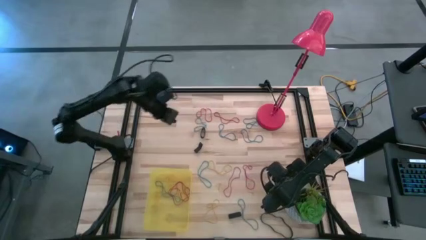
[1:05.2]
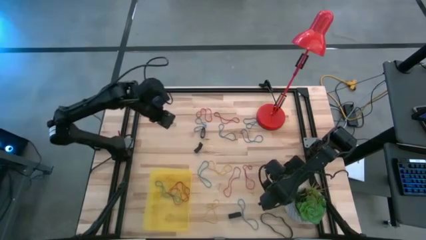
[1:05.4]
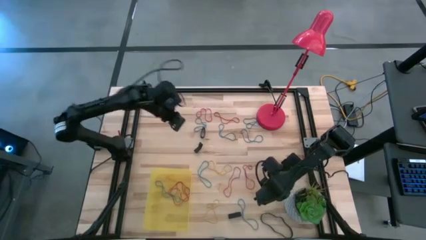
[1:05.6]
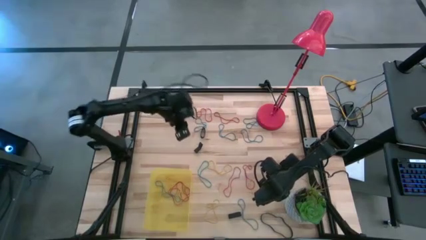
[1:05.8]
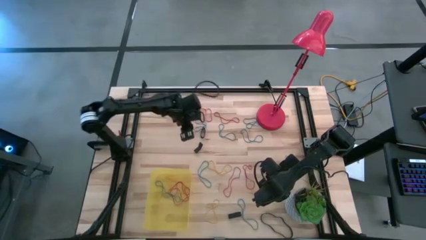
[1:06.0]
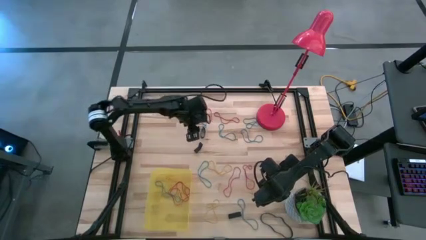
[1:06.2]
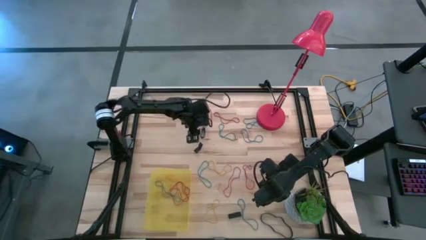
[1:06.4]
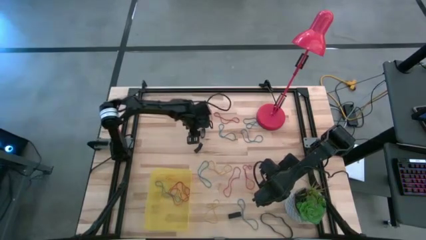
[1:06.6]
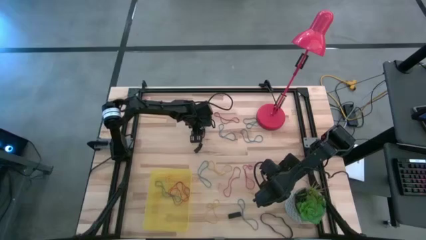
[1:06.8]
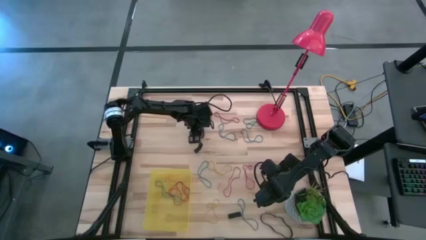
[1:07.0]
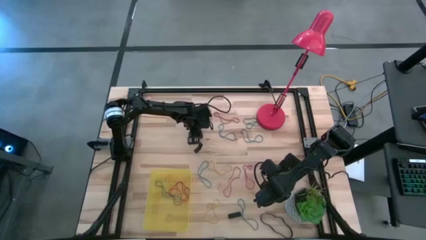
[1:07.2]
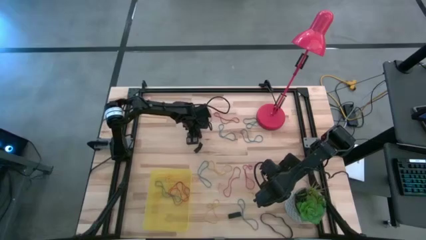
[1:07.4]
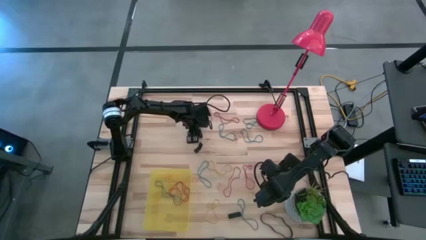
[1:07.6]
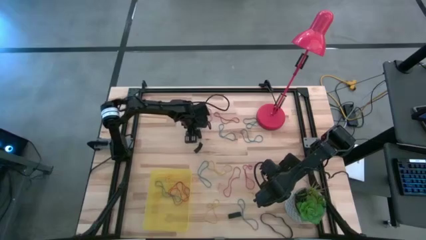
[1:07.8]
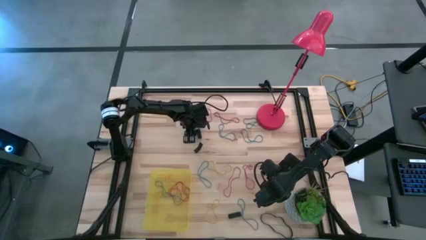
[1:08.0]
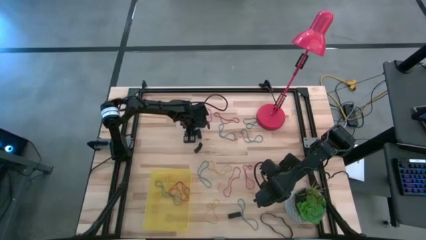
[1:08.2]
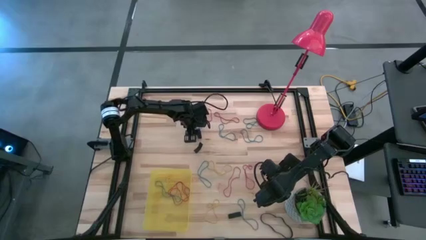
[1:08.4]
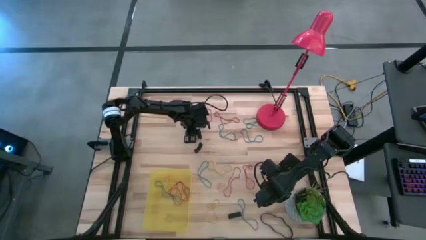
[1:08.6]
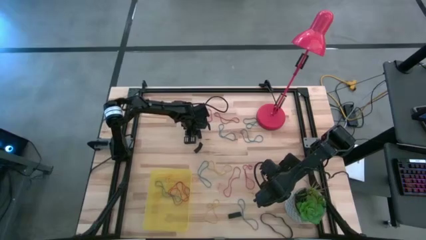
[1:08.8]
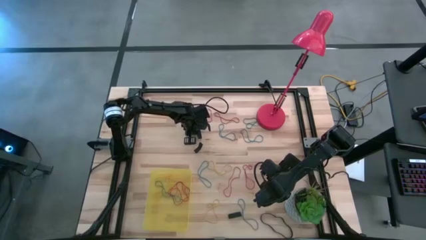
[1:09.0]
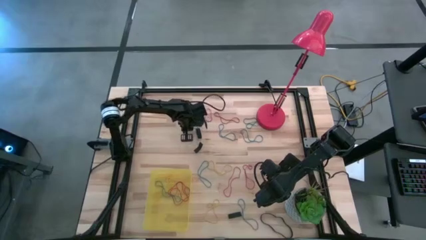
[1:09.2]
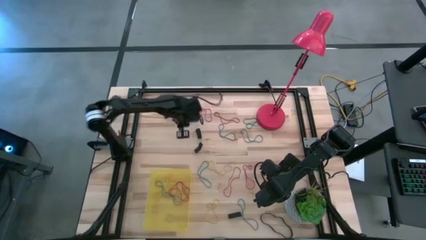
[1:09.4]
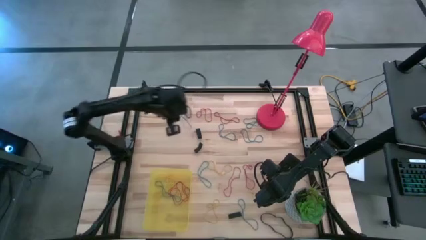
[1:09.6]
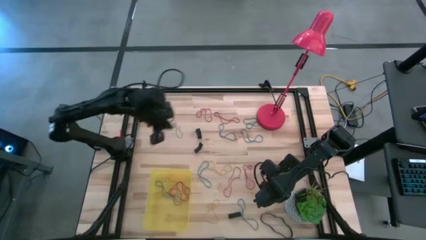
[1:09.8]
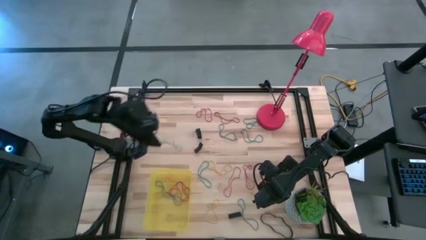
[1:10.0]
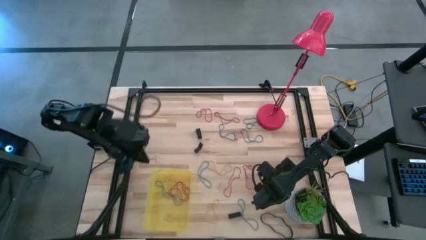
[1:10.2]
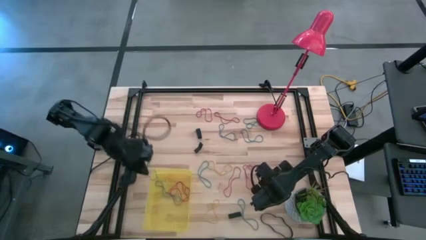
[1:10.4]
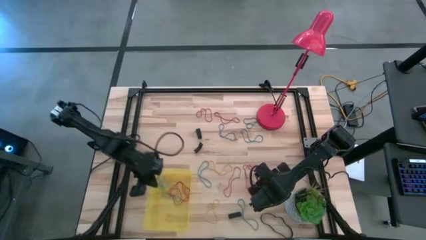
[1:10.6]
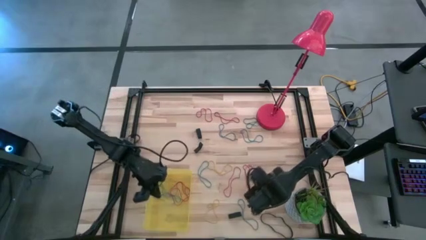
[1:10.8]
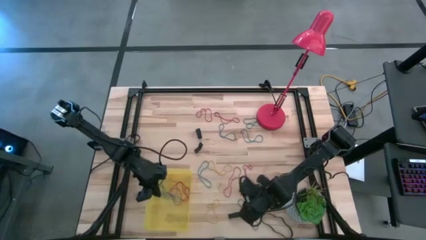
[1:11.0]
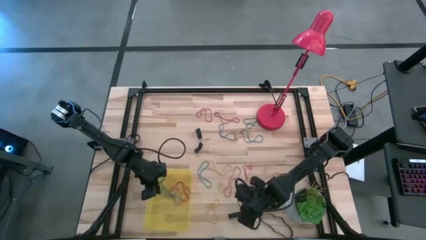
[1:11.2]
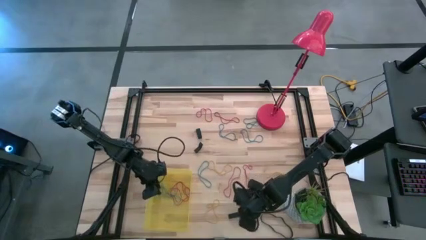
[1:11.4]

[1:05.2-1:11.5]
Task: Pick and place rubber bands into bin
Put the blue rubber band into the bin

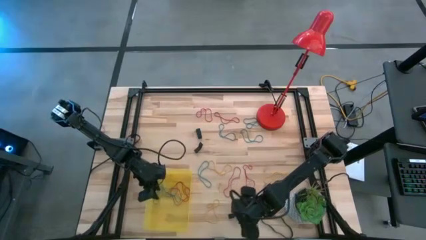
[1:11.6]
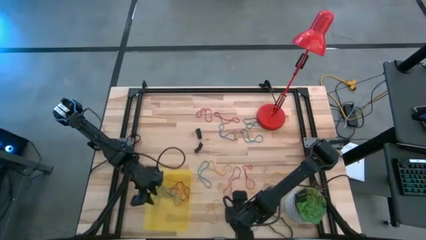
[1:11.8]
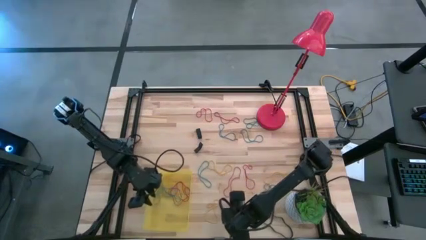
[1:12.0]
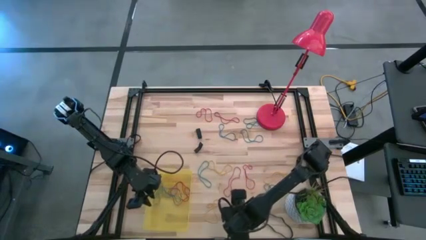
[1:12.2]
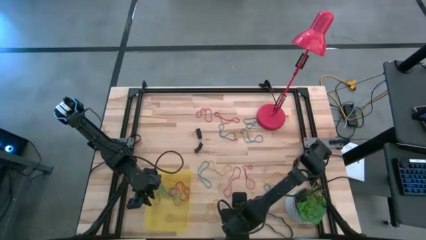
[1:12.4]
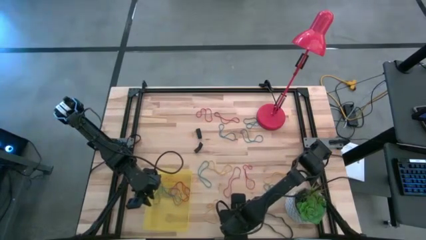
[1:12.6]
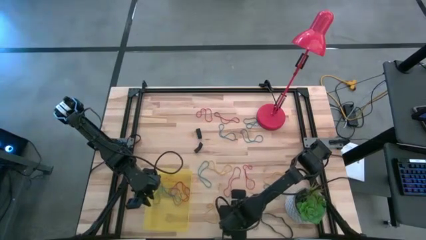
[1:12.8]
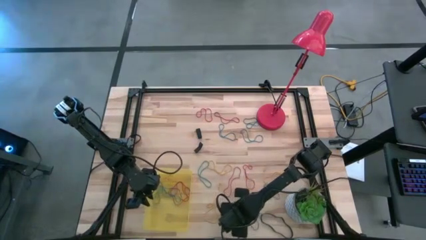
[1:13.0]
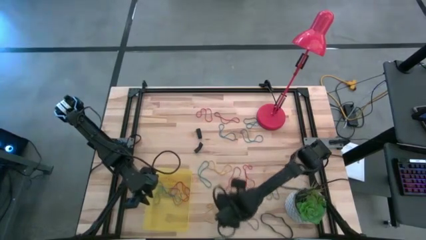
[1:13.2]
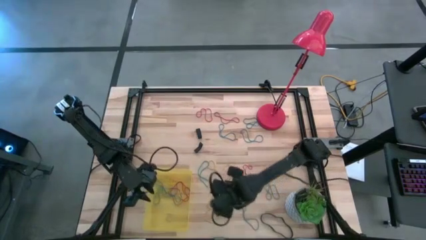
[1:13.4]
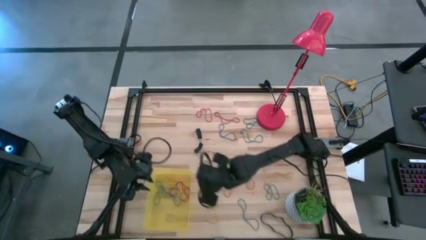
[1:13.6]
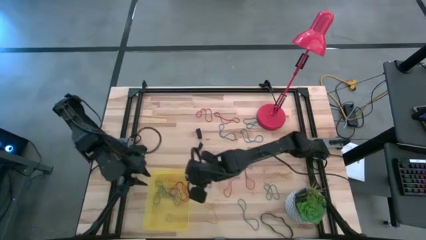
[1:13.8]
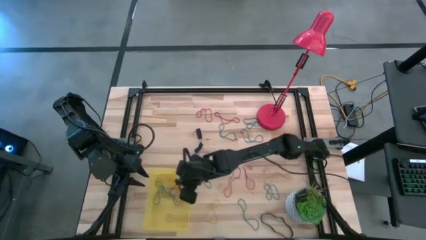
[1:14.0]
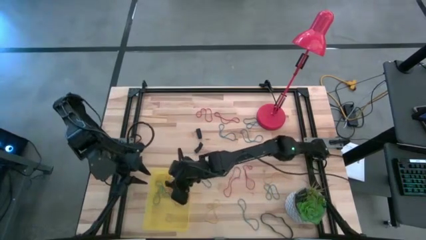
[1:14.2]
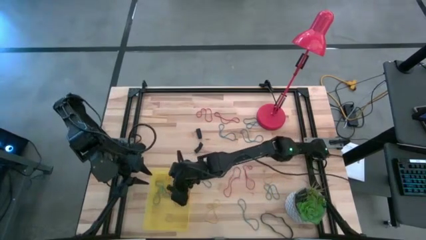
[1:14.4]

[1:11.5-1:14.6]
Put the black rubber band into the bin

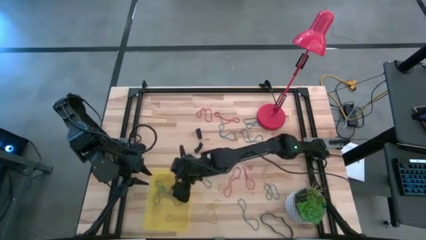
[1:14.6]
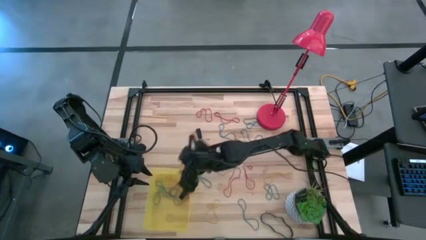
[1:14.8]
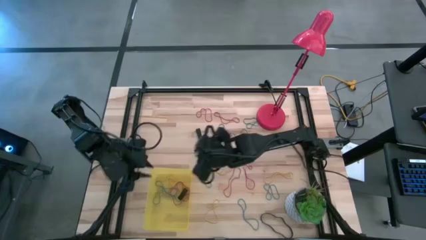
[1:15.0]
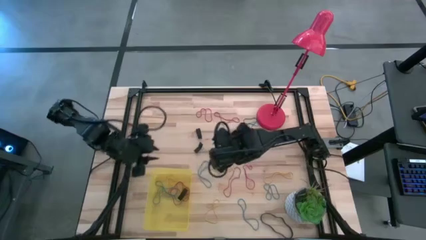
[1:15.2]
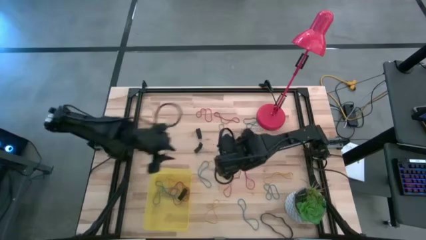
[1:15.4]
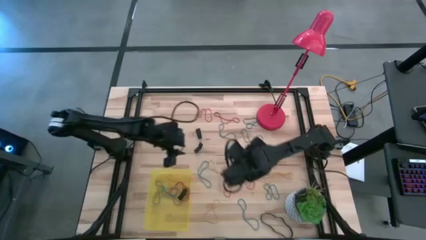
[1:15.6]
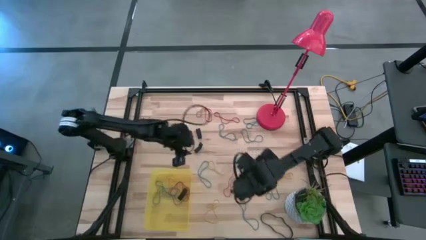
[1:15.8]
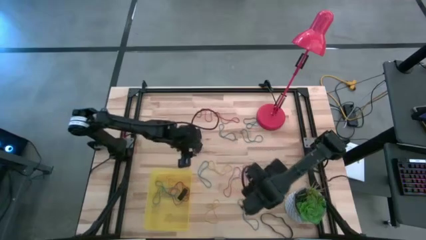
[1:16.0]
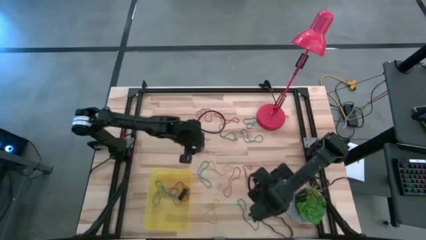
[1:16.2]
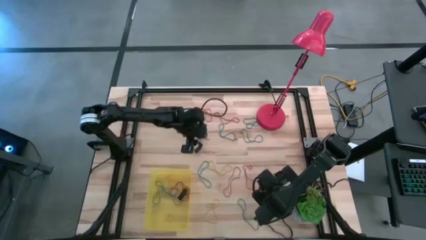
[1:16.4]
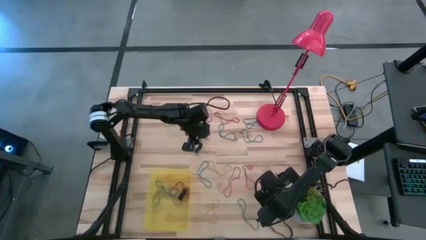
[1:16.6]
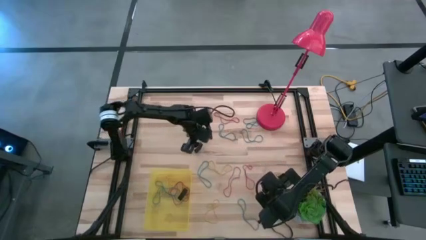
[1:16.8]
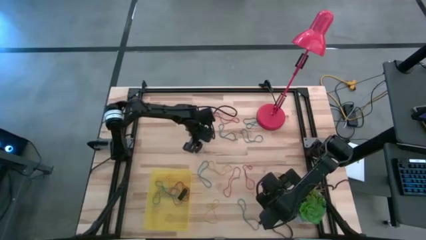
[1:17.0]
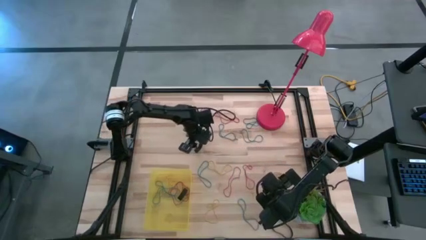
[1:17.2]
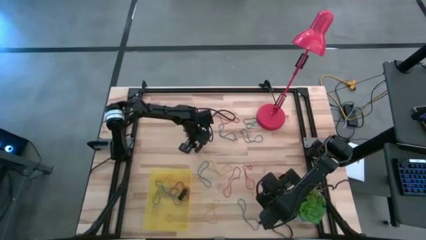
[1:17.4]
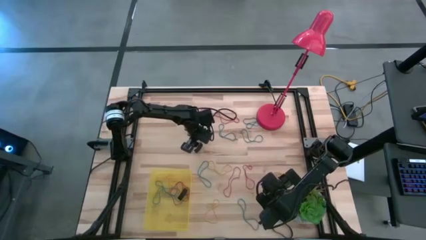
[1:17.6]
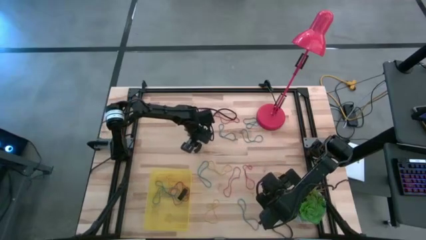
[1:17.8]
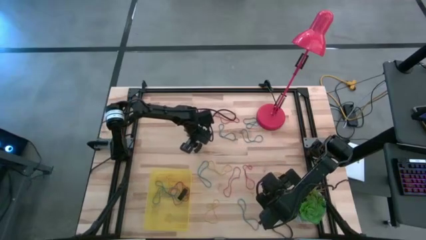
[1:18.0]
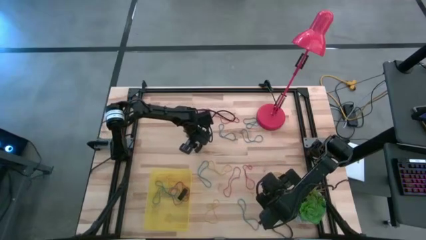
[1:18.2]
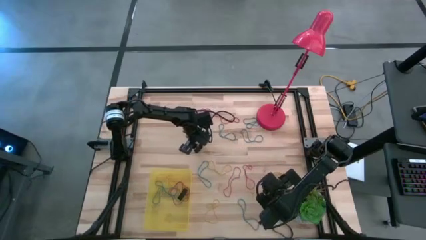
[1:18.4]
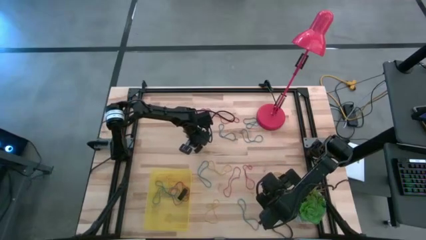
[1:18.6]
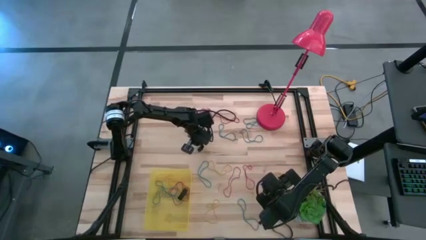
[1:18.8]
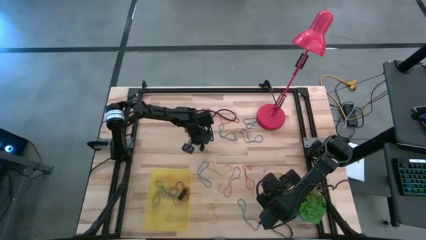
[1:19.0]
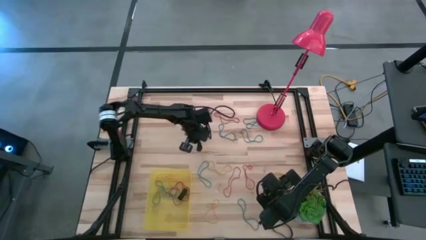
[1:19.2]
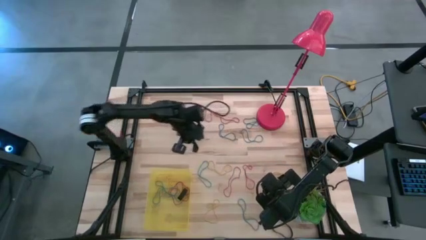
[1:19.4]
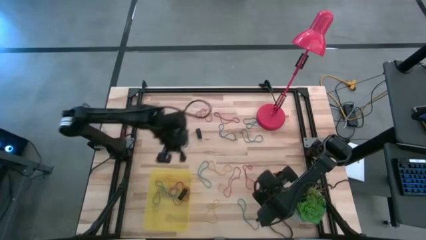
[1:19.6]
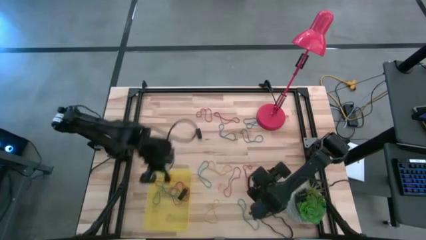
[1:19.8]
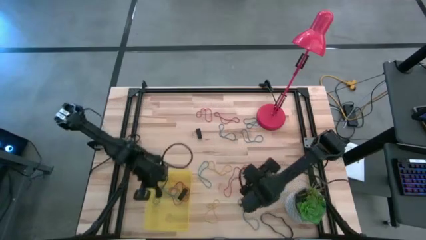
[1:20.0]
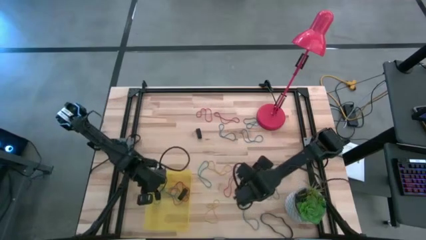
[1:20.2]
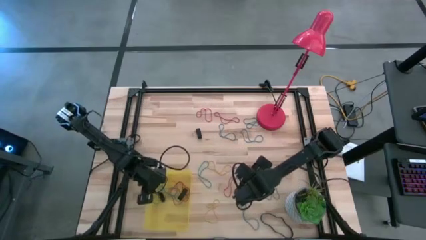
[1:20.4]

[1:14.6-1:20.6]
Put the black rubber band into the bin

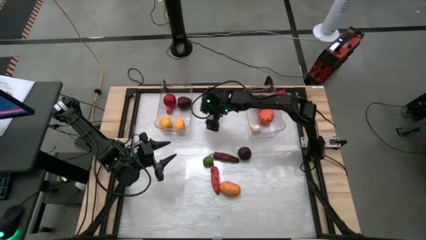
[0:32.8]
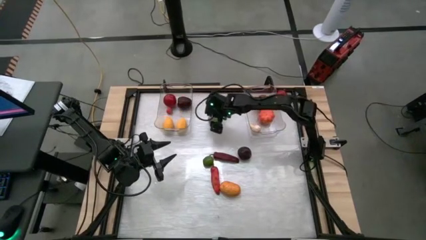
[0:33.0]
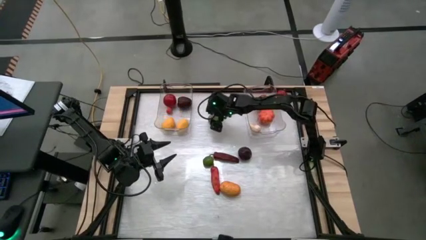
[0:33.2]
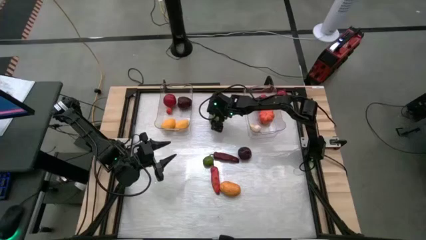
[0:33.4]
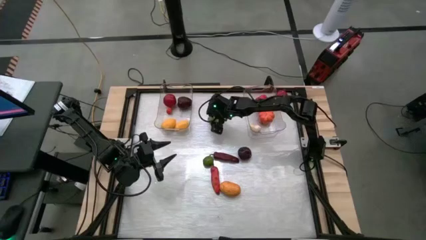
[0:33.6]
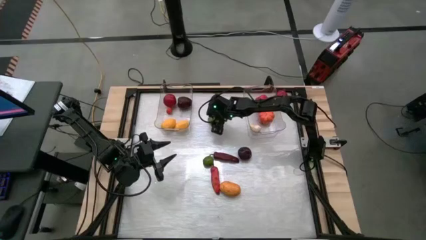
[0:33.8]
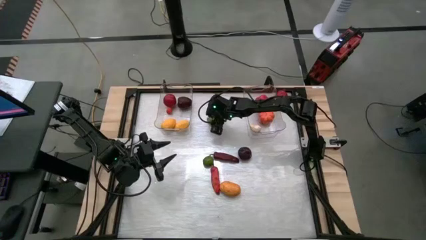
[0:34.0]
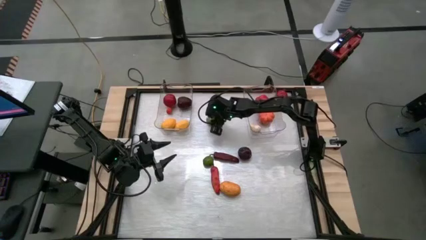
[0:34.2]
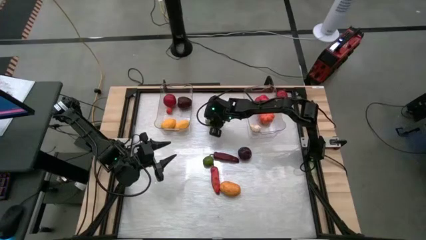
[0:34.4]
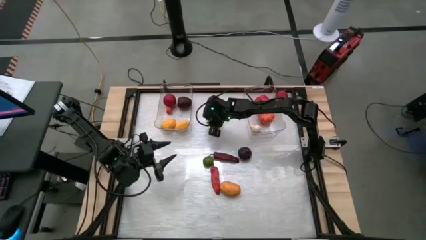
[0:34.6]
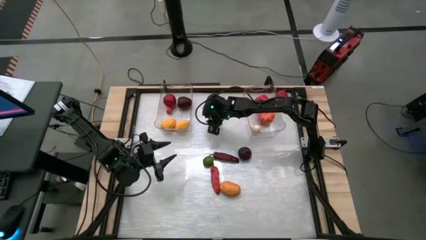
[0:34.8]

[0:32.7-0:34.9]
Task: Sort produce into baskets
Put the top lime into the left transparent bin
